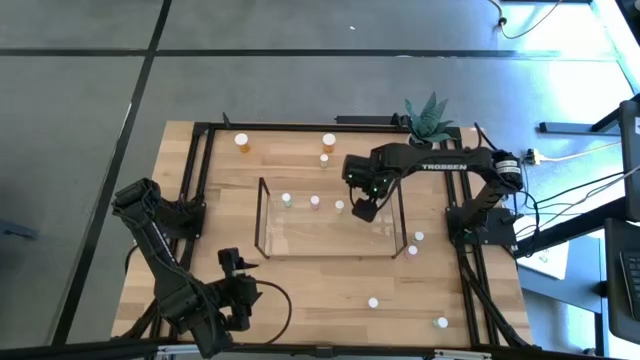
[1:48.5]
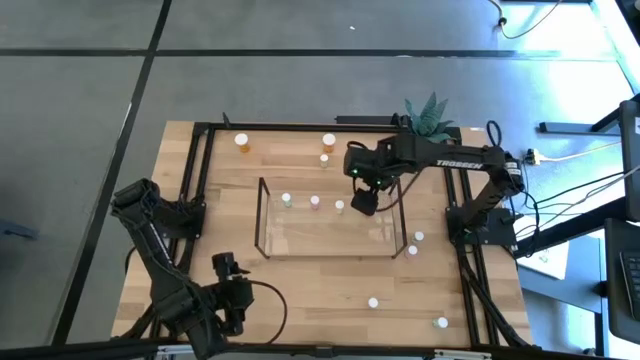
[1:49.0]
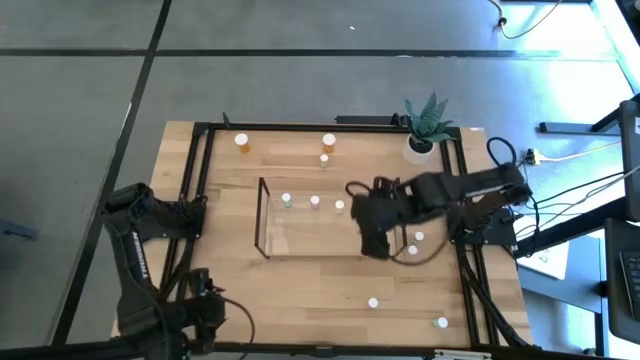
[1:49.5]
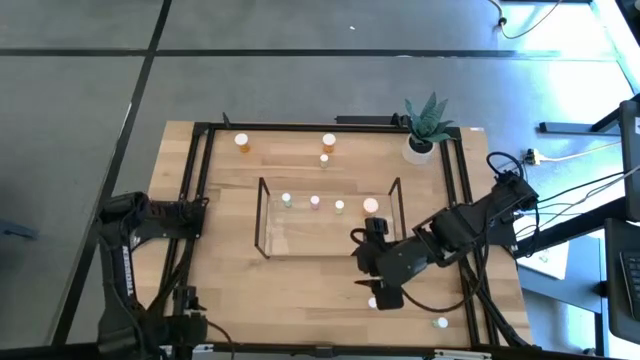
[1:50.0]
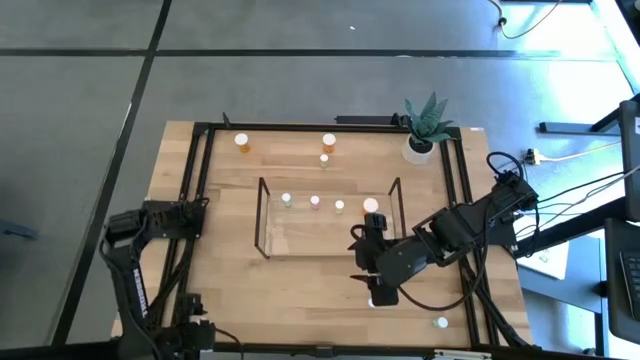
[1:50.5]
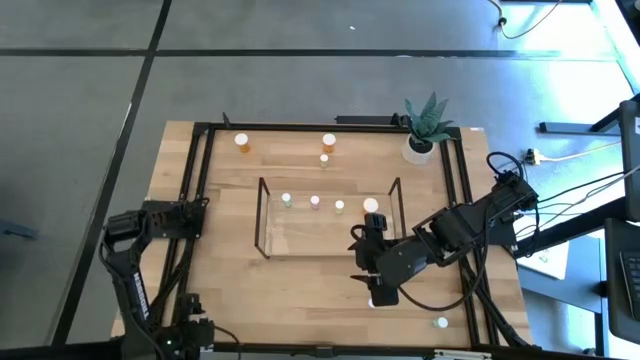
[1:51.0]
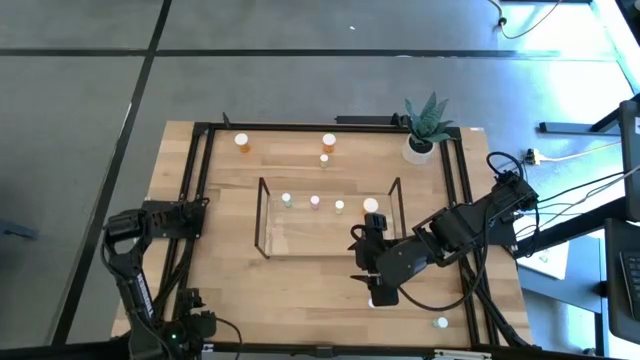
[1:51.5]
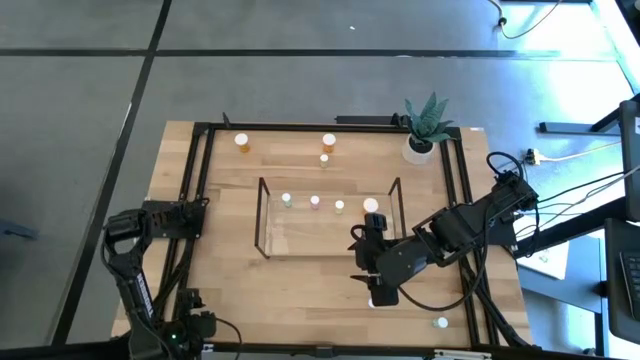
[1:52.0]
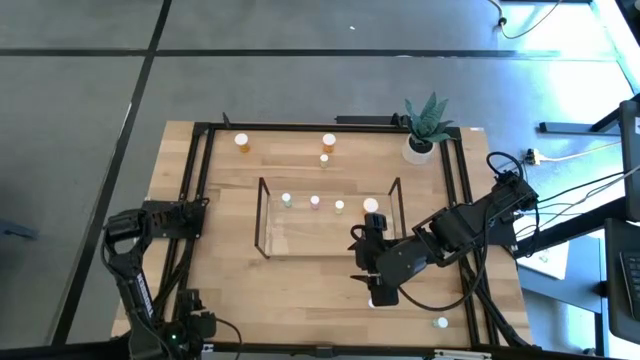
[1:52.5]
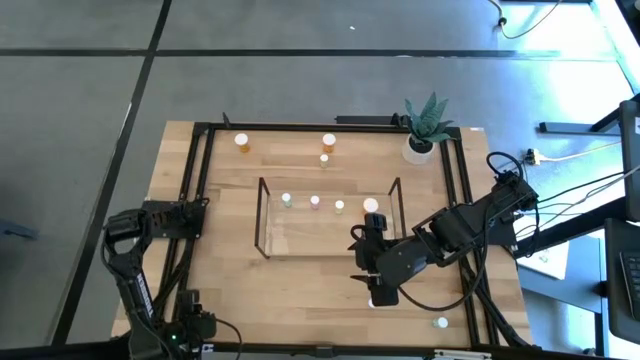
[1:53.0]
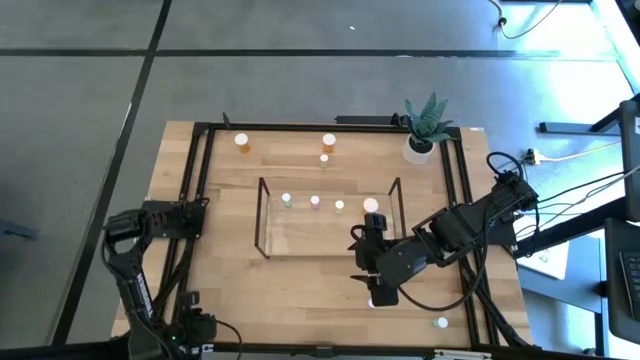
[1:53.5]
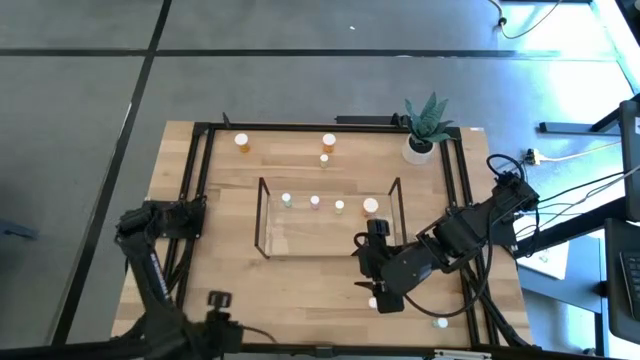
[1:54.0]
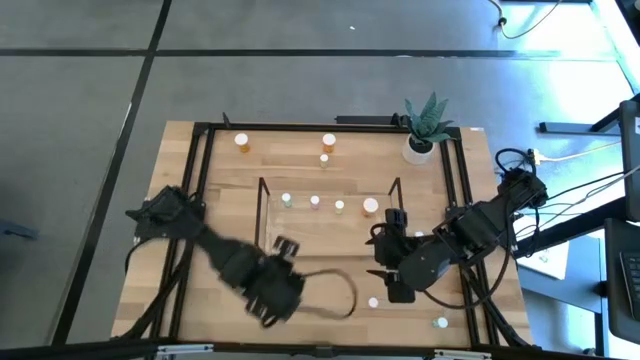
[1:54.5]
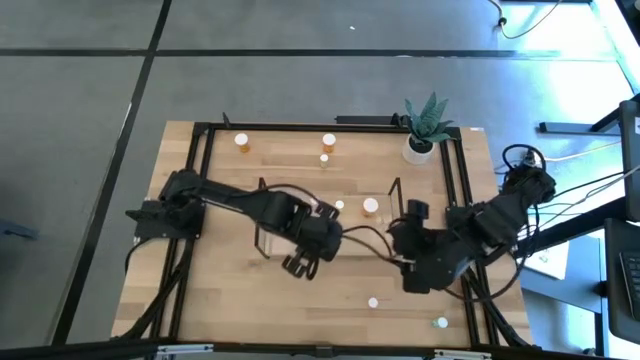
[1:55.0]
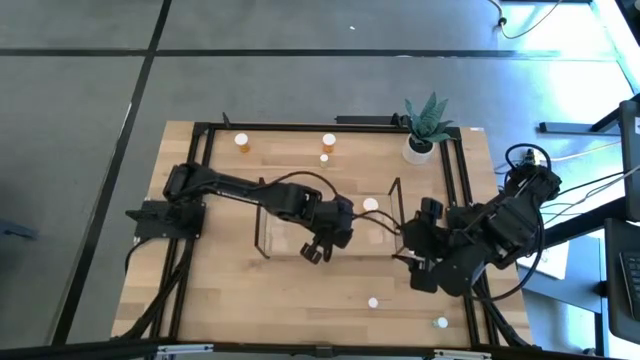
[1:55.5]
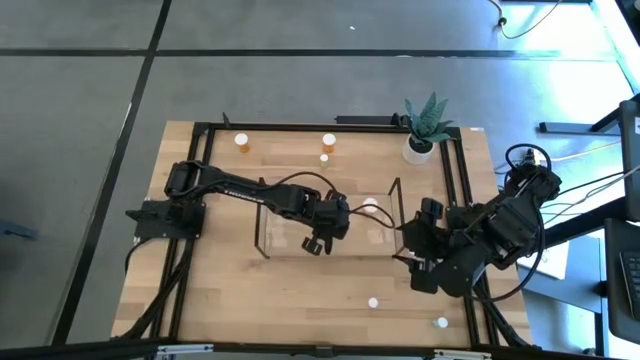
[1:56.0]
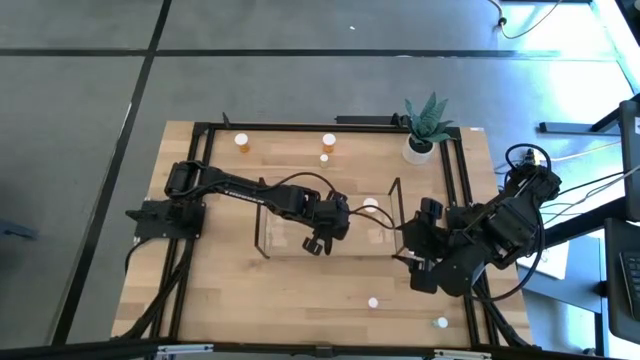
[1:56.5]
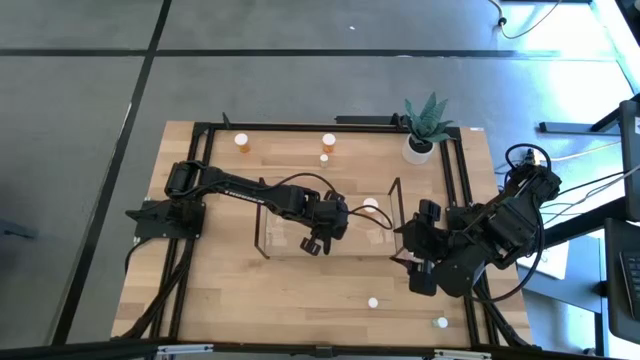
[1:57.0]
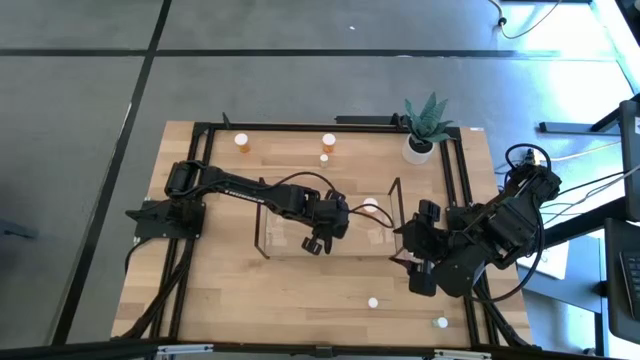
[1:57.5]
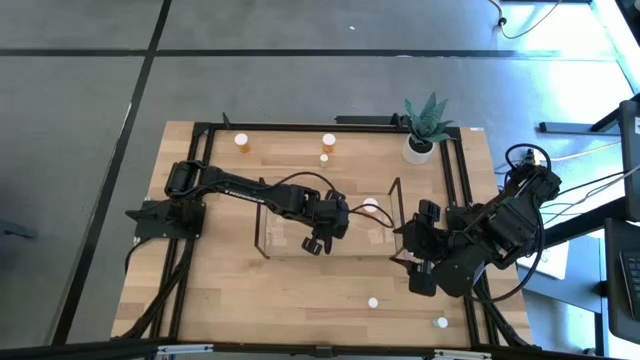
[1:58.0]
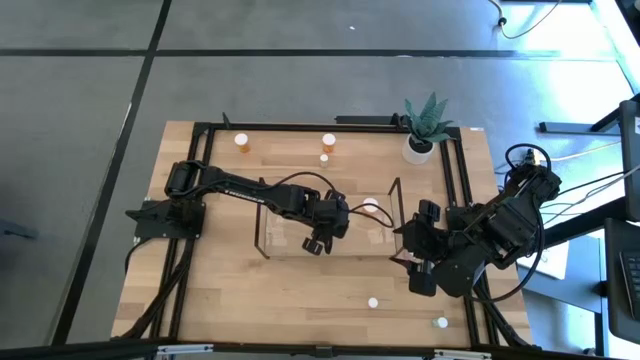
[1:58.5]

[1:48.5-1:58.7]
Task: Pick and place medicine bottles onto shelf by color
Put the bottom yellow pill bottle on the shelf aligned with the other yellow pill bottle

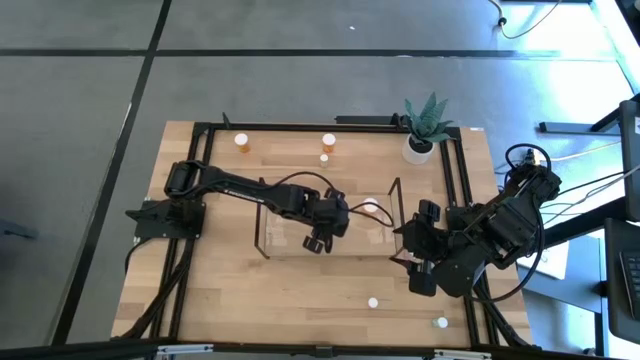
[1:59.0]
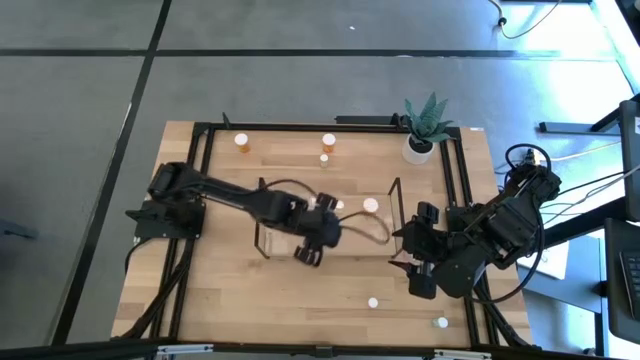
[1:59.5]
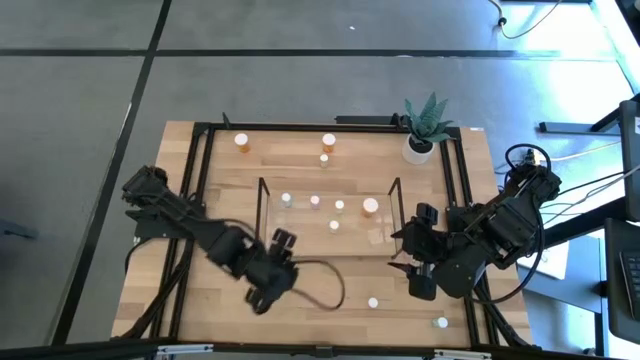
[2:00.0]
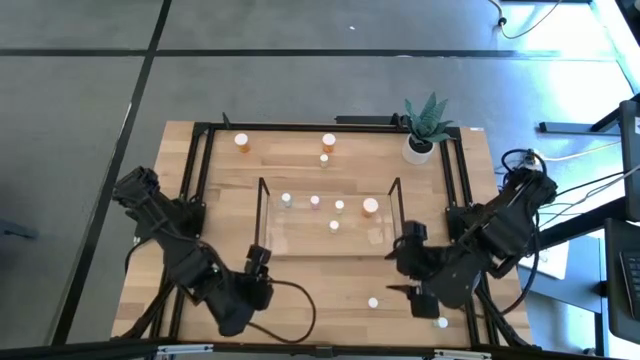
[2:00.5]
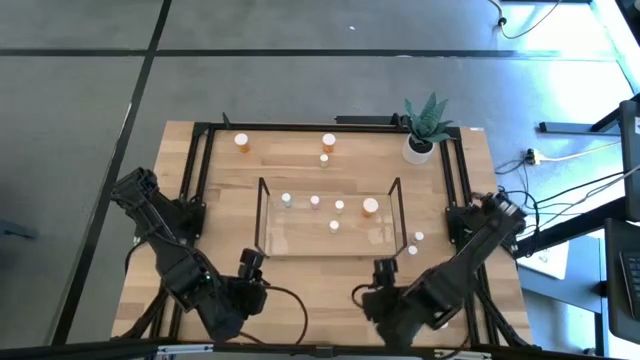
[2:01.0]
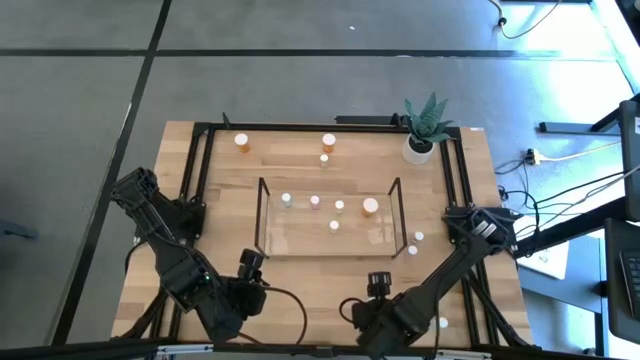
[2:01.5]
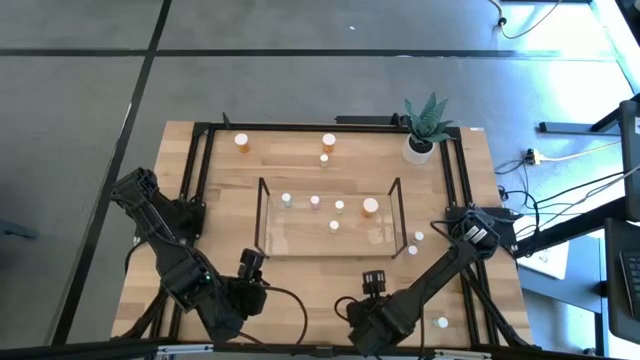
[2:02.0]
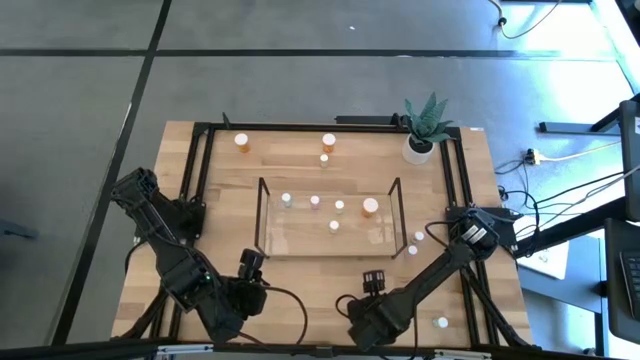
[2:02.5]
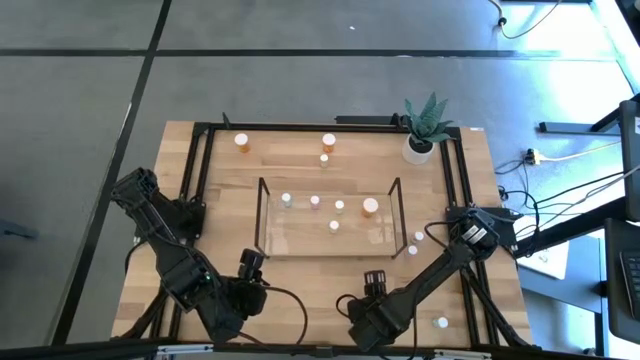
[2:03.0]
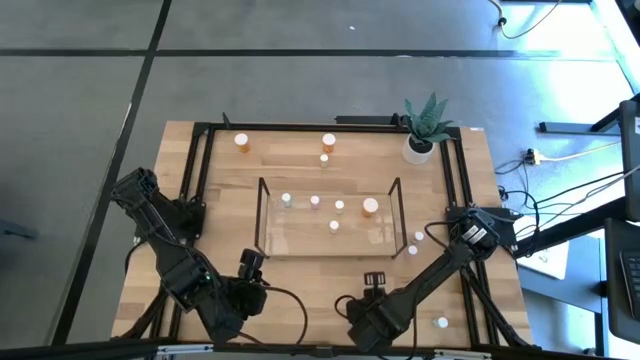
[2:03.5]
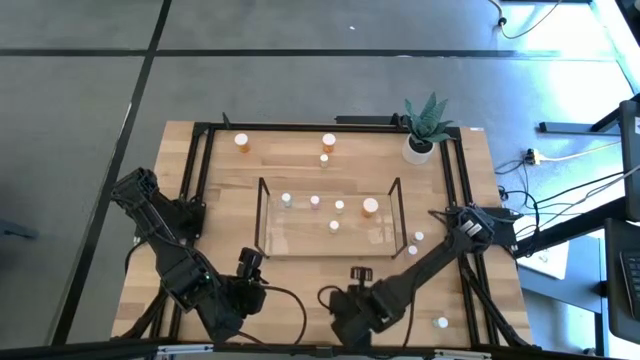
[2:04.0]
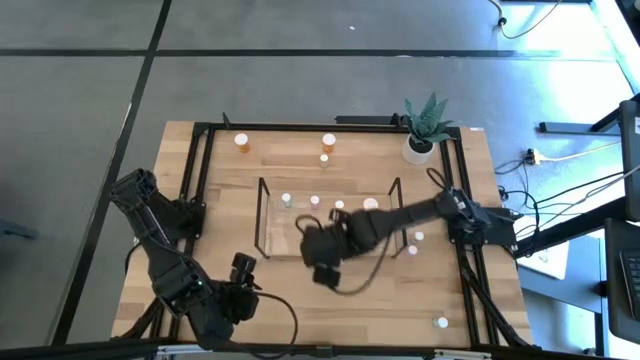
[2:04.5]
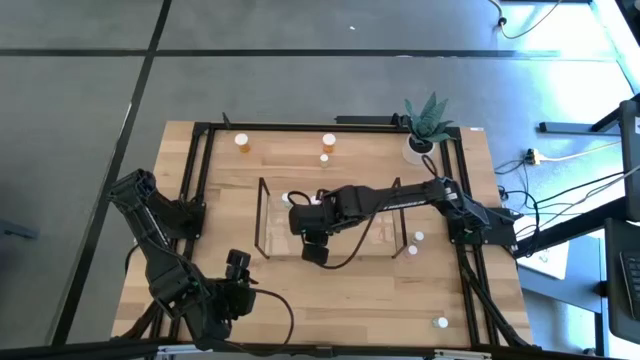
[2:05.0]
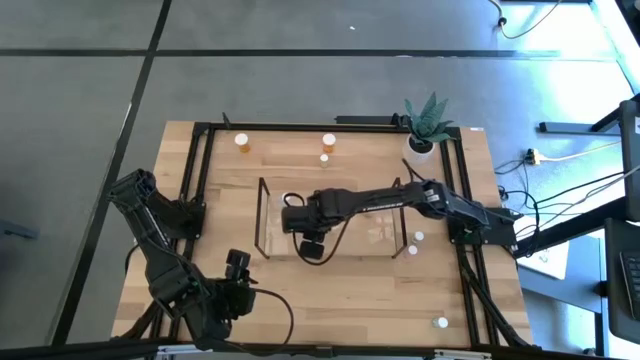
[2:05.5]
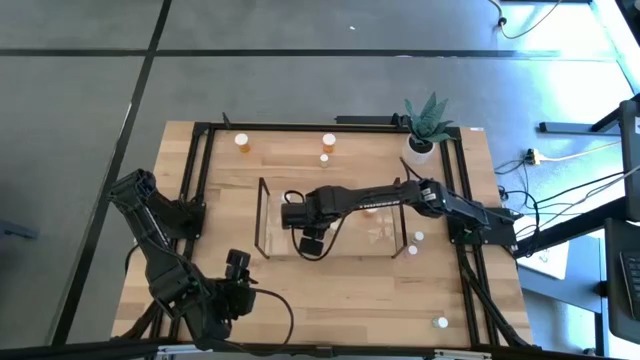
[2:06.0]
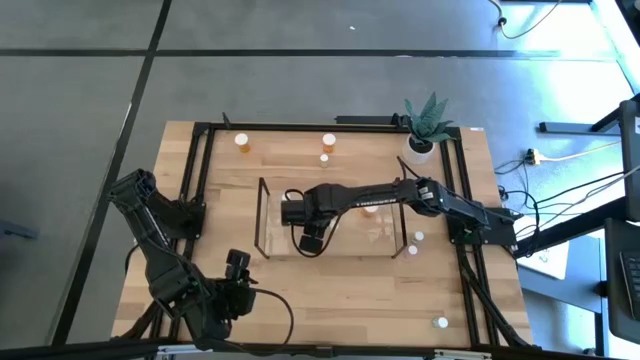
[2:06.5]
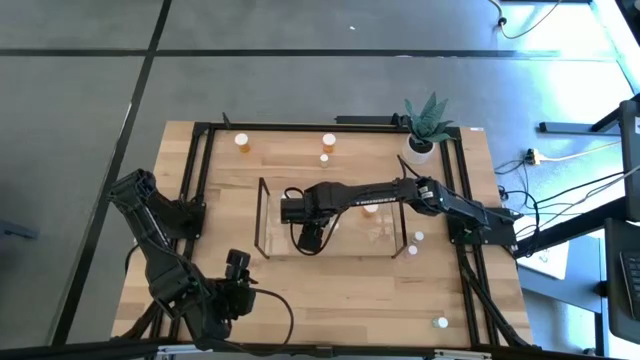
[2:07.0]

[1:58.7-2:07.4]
Put the bottom pink pill bottle on the shelf aligned with the other pink pill bottle

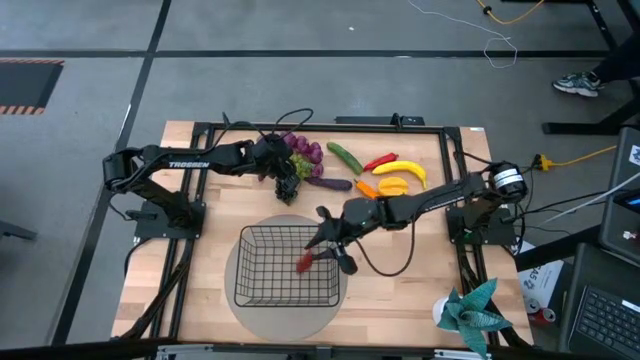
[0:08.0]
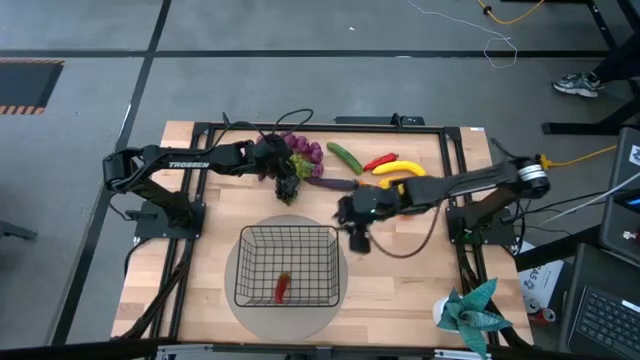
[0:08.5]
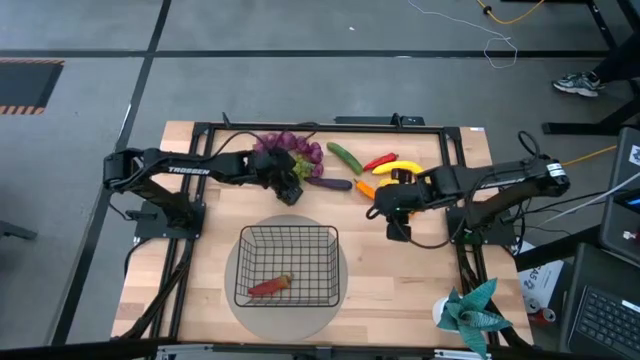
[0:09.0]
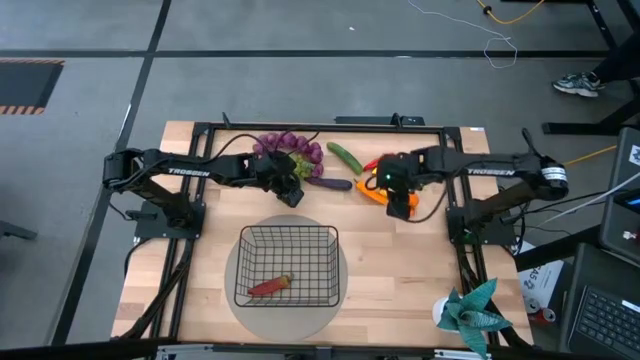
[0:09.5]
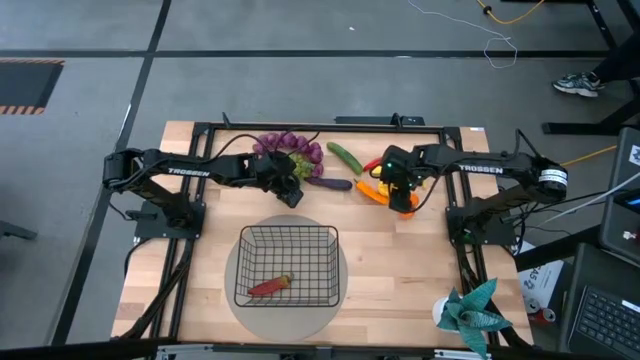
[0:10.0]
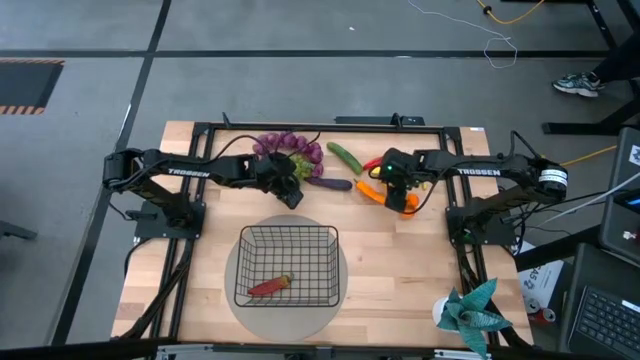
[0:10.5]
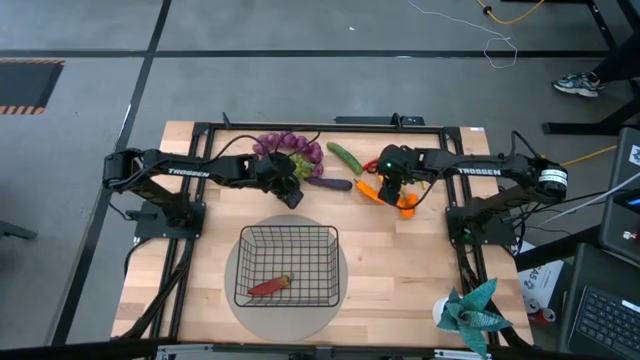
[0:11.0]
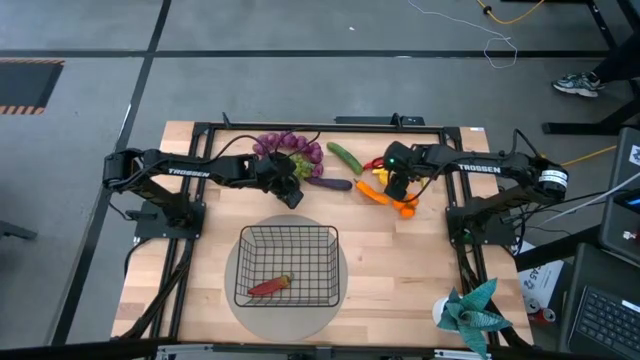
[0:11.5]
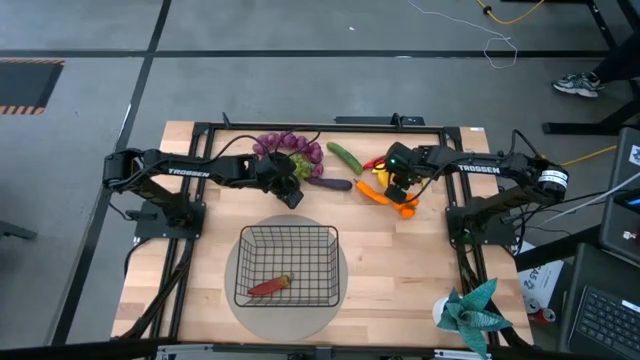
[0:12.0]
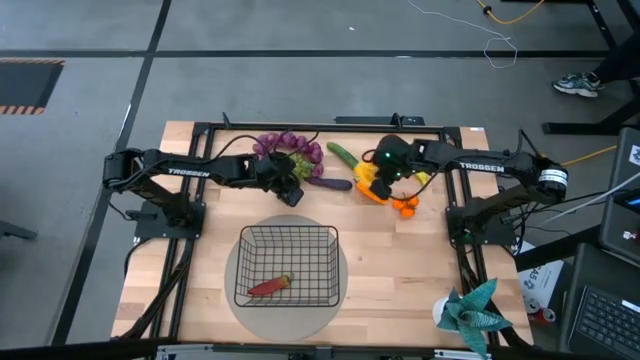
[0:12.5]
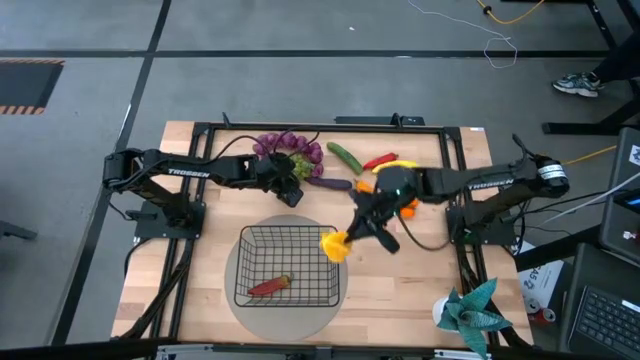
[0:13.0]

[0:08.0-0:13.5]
Task: Build produce basket
Put the starfruit into the black wire basket
